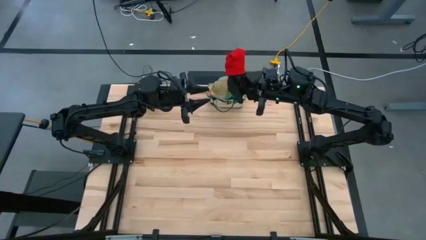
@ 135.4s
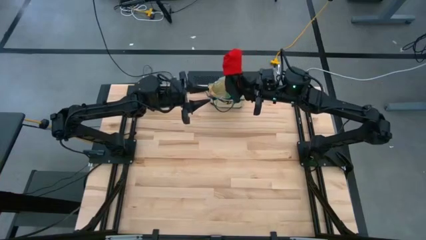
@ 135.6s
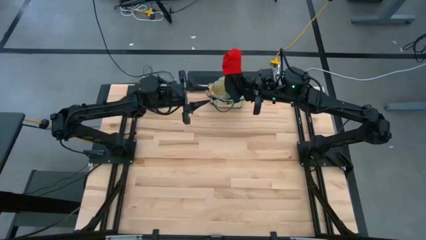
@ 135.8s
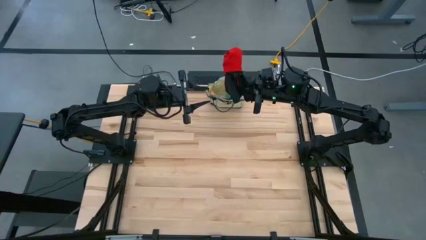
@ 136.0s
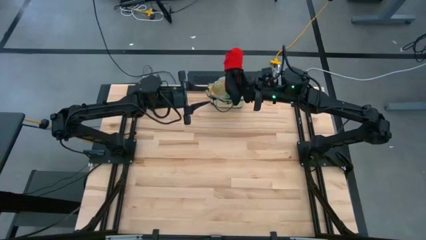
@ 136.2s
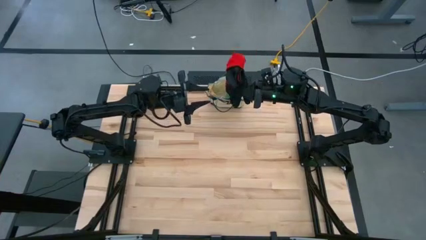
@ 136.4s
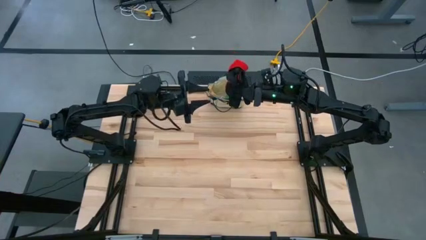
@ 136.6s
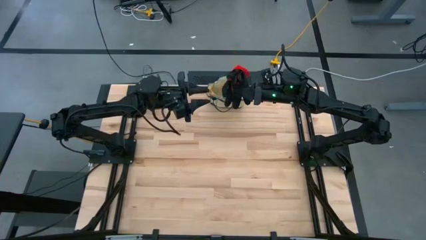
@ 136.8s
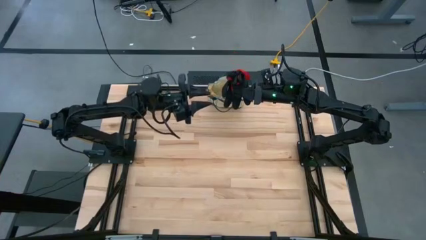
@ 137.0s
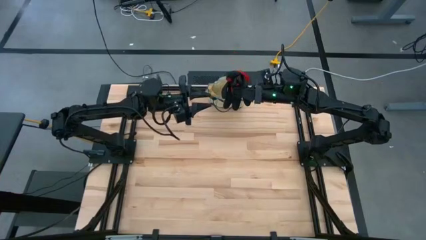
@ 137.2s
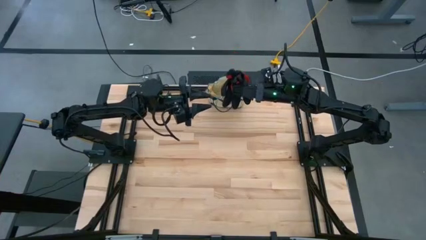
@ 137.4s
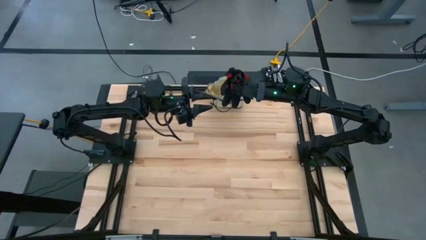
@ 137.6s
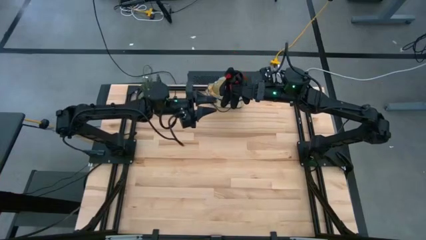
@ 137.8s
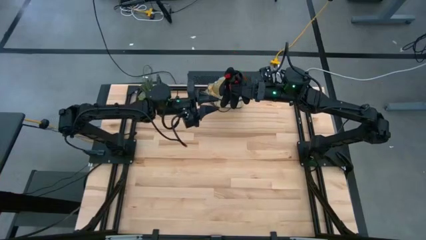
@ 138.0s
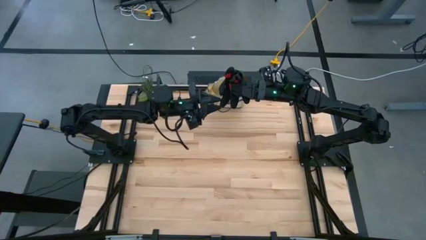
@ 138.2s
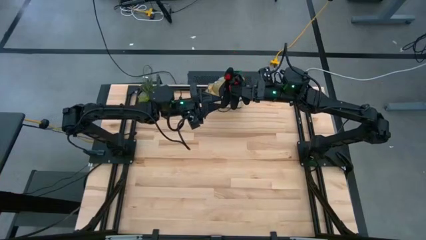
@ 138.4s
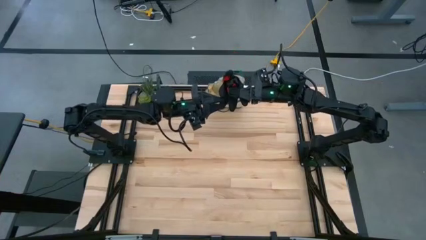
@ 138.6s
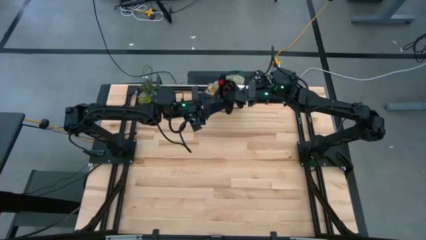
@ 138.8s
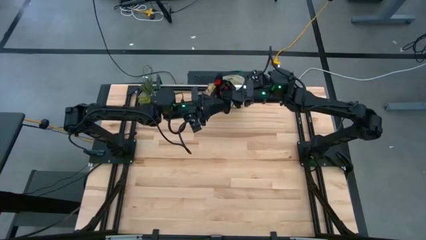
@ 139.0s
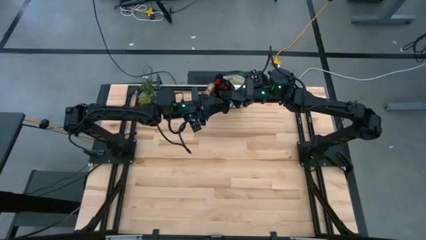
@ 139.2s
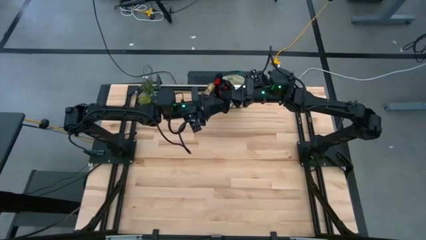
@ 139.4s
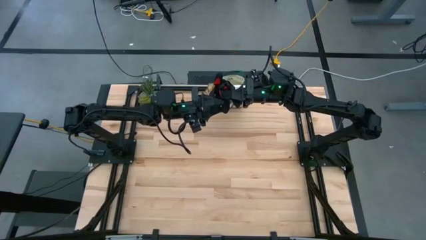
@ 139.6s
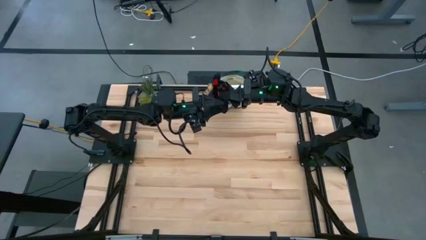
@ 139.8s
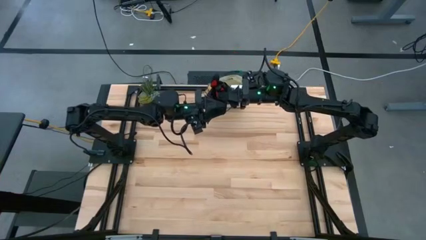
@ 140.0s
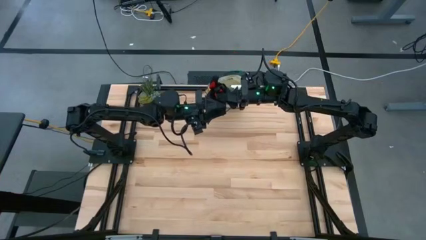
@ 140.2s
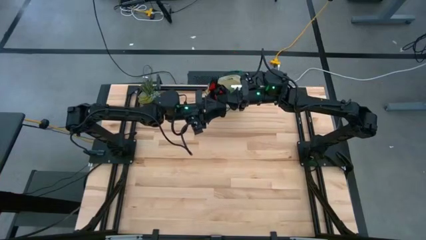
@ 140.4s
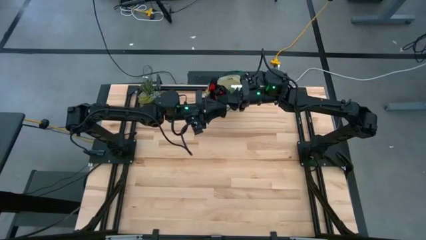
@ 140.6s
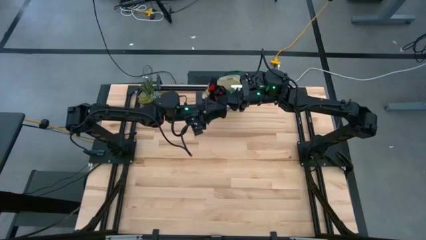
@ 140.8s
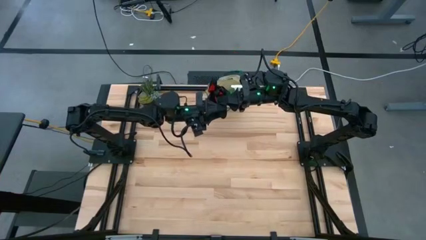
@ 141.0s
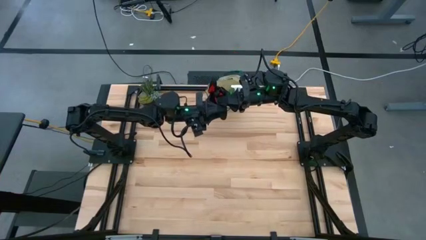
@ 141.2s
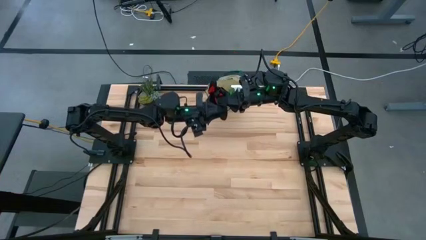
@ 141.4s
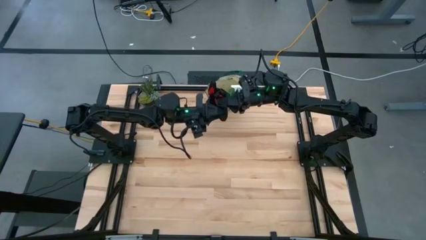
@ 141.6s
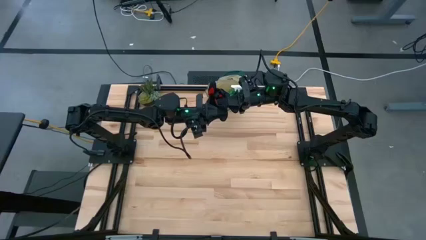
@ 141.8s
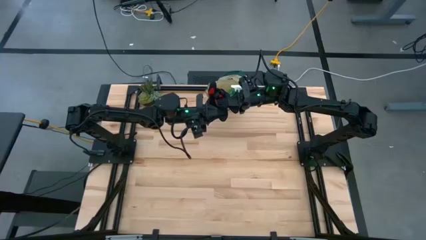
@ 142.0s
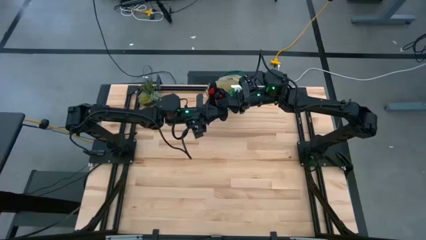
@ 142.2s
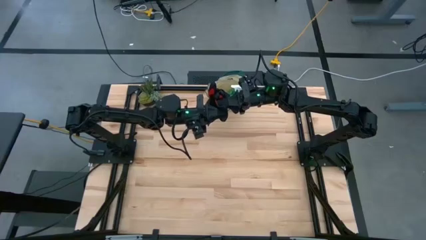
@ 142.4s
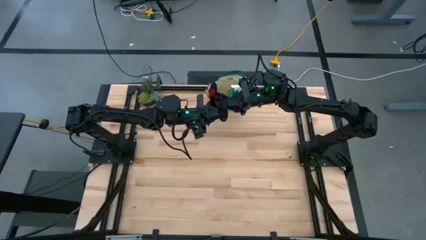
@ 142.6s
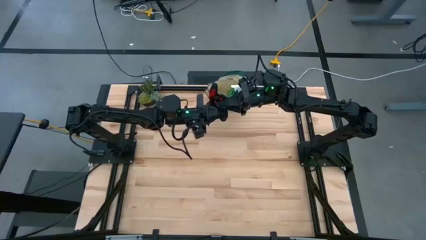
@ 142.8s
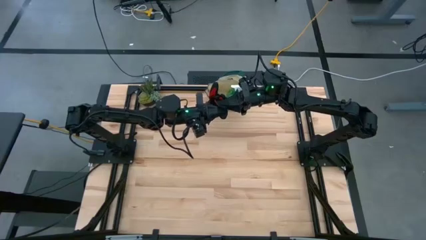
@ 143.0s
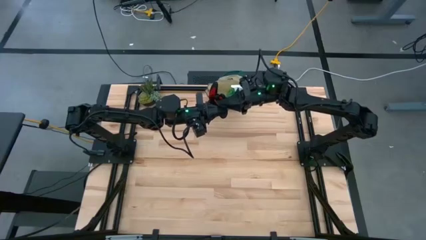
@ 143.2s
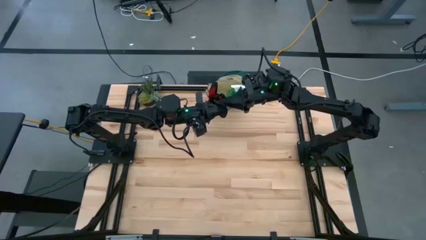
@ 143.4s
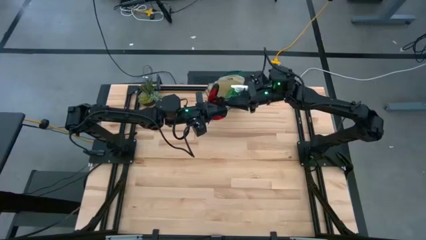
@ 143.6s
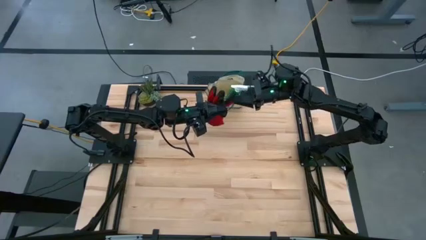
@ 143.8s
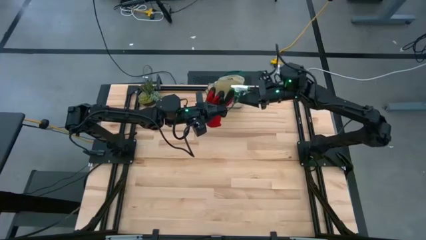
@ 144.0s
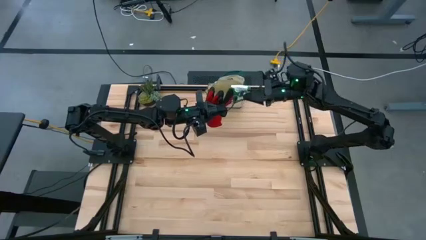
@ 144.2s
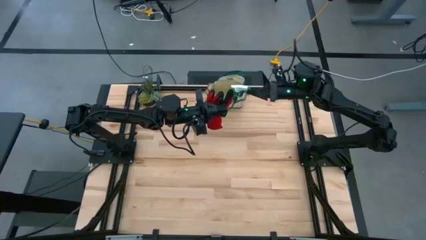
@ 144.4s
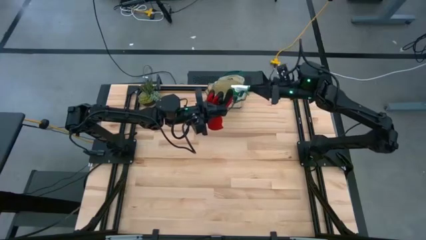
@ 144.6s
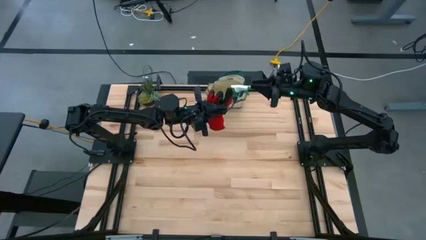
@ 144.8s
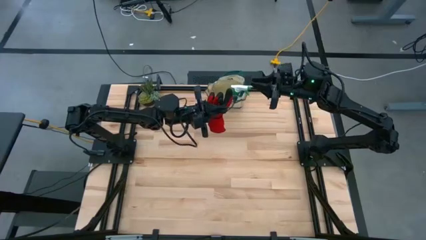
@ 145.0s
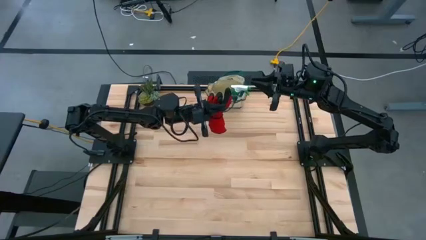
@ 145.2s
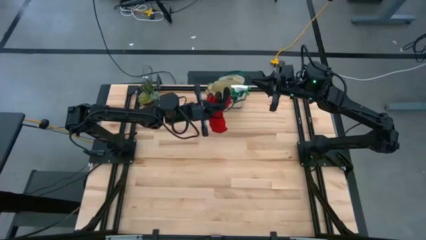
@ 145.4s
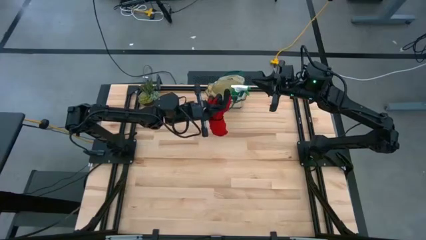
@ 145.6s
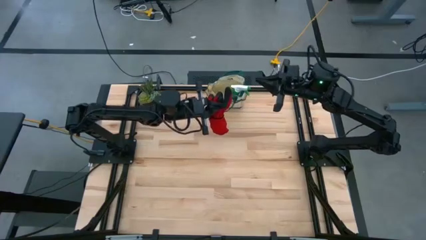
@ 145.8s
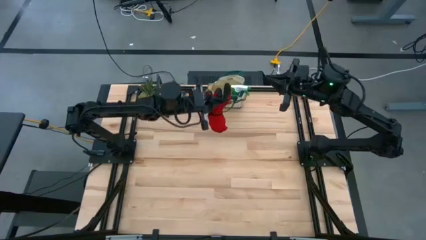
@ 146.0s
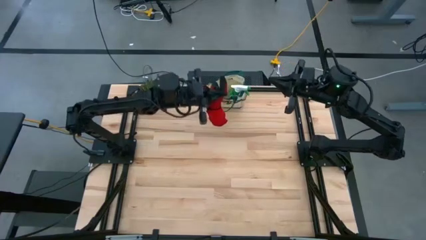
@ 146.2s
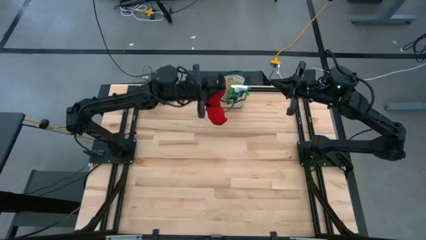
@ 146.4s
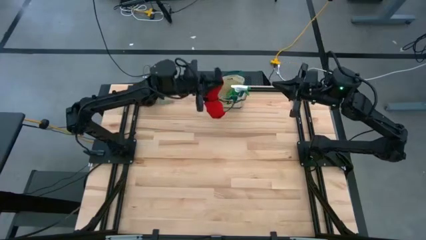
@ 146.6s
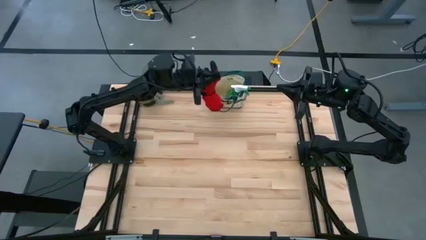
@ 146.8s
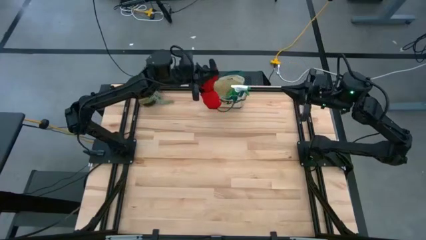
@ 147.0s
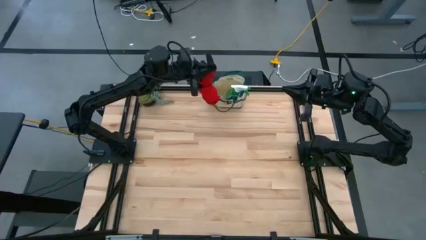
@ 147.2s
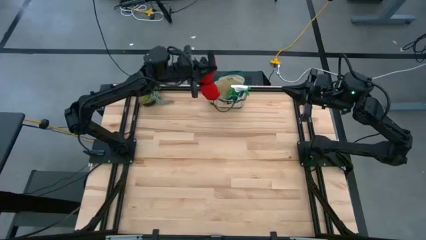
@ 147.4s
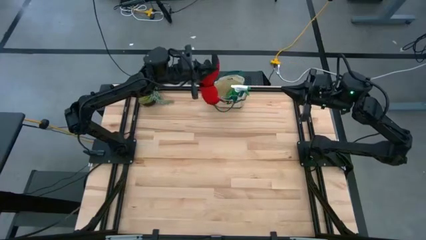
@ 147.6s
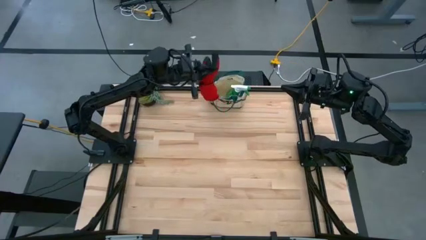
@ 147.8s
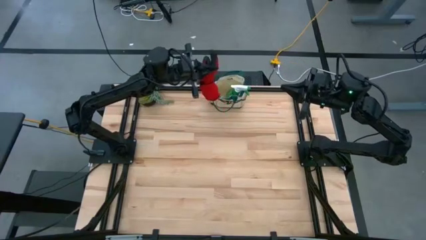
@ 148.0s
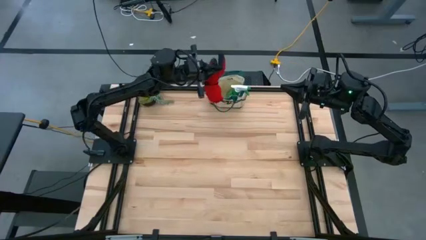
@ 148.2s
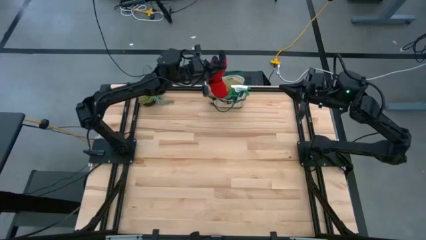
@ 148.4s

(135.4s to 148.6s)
Task: Pick & Place Garden tools in Gardening bag
Put the red gloves into the white gardening bag

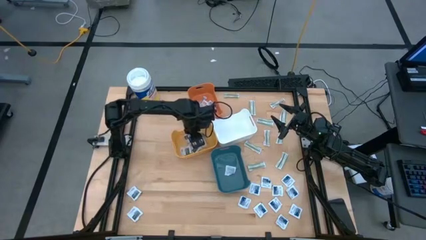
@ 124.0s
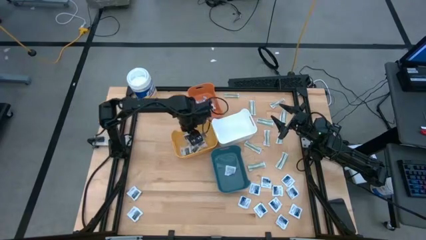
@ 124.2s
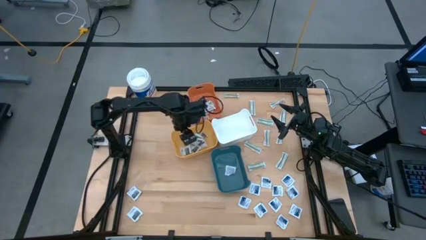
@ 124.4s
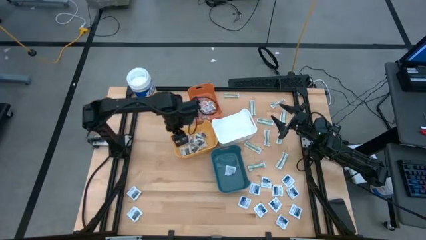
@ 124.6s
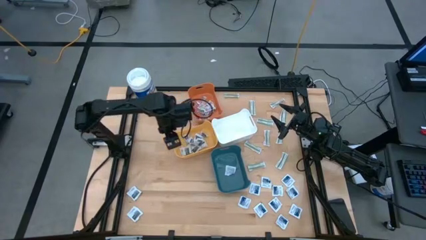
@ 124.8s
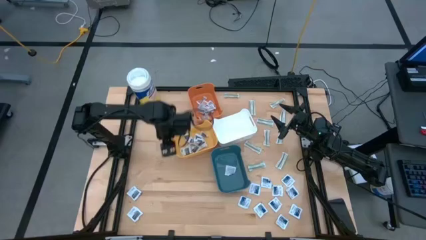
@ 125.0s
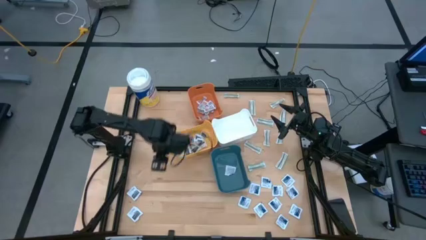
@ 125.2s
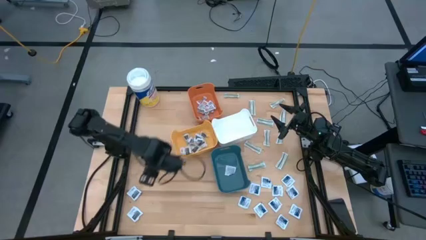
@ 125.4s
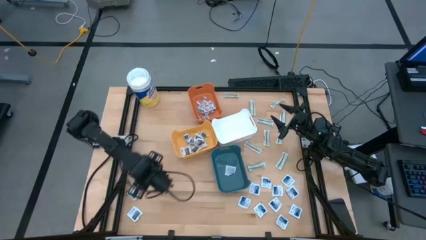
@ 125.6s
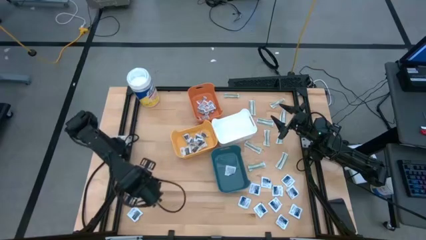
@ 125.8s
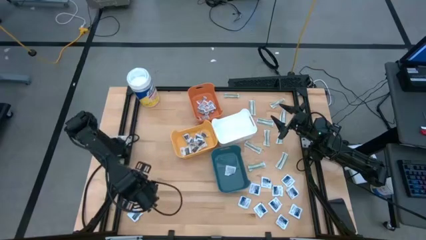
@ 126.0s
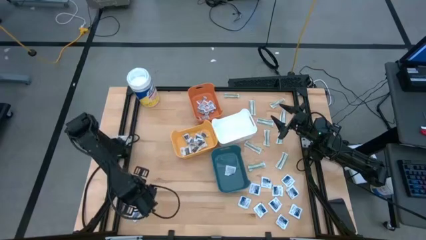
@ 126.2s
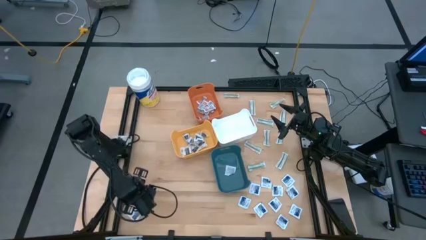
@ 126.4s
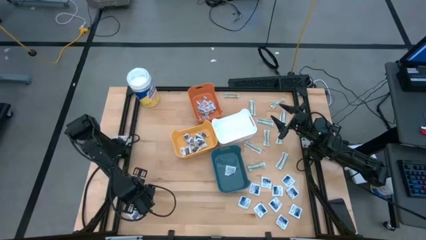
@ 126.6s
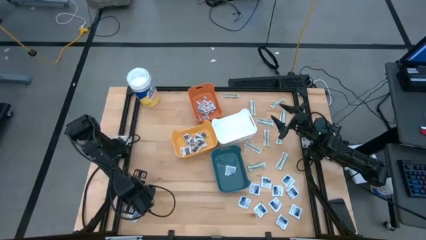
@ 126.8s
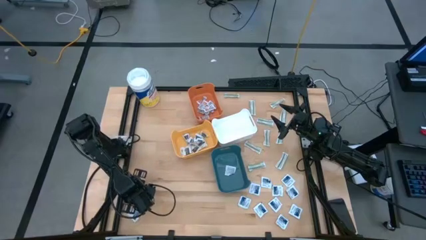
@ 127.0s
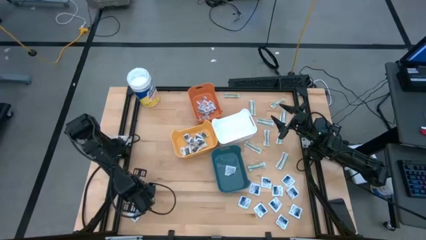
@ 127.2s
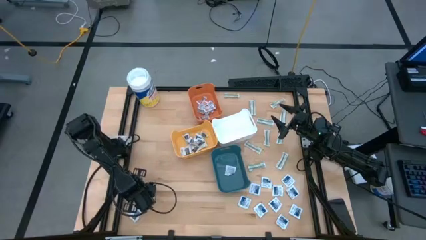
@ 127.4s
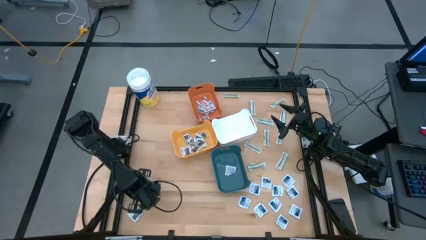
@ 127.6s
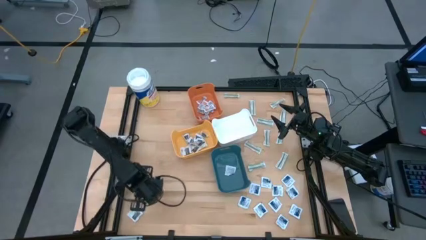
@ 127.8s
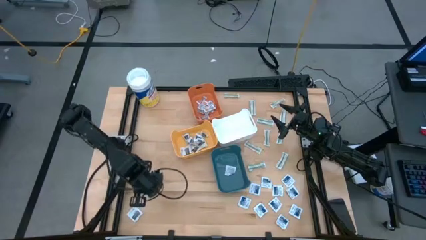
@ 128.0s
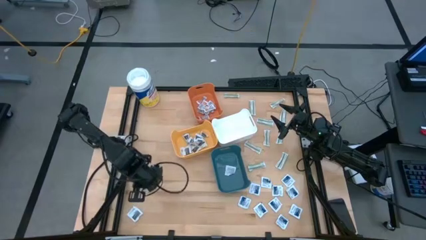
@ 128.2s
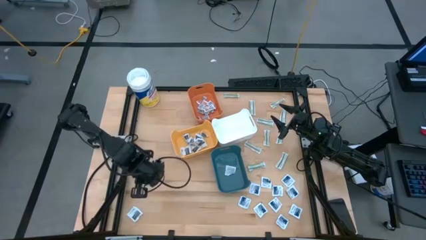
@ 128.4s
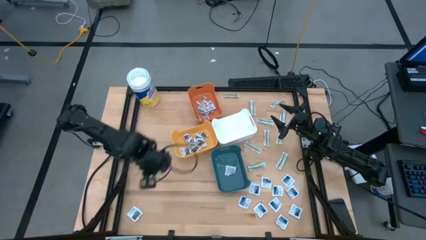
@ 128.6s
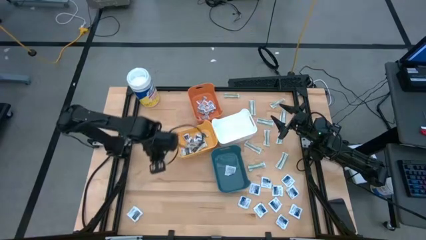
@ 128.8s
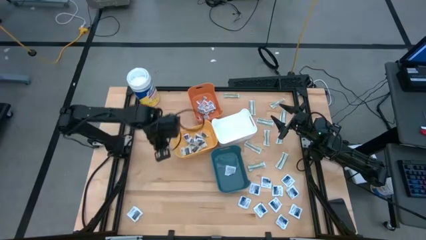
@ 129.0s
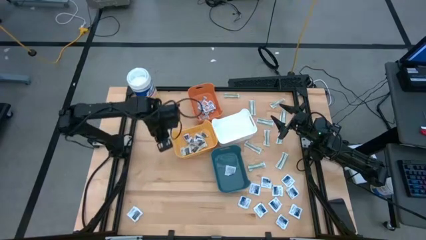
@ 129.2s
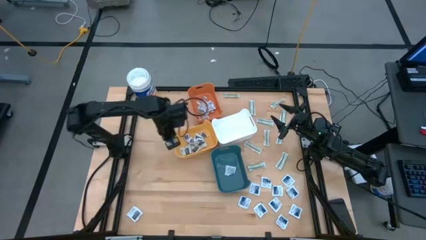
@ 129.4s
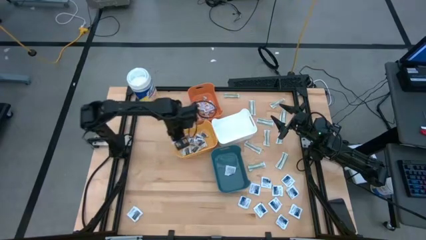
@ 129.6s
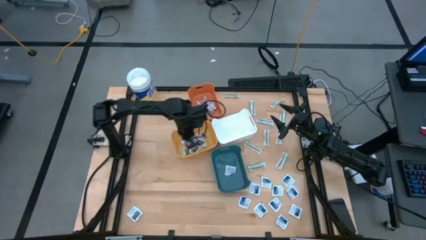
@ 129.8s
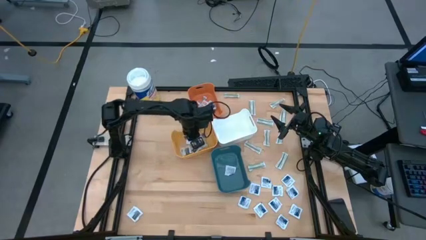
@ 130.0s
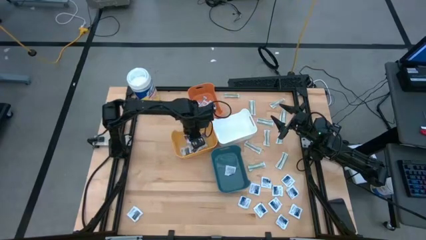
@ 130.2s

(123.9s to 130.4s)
Task: Pick & Place First Aid Supplies
Put the black towelette pack into the yellow bin
